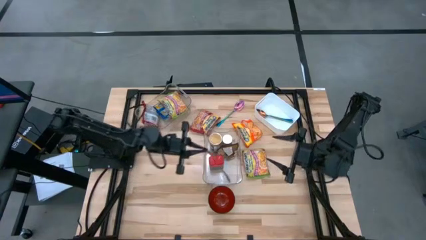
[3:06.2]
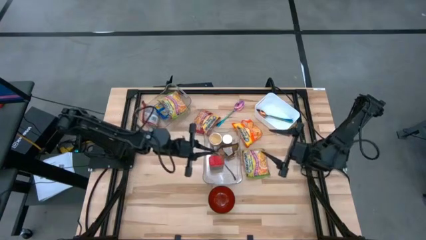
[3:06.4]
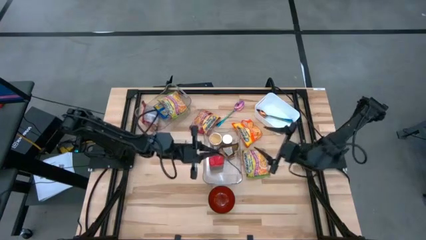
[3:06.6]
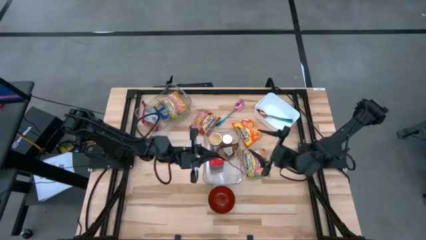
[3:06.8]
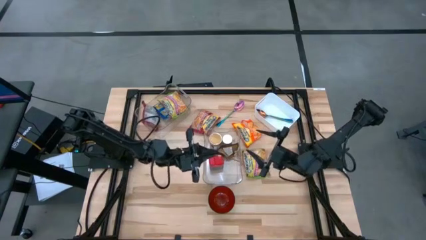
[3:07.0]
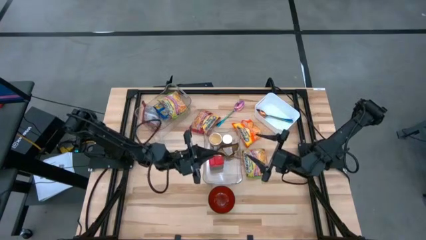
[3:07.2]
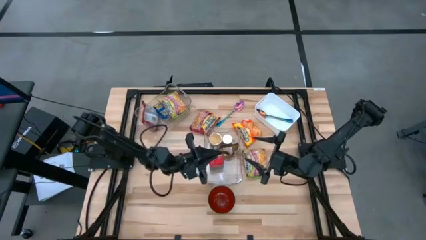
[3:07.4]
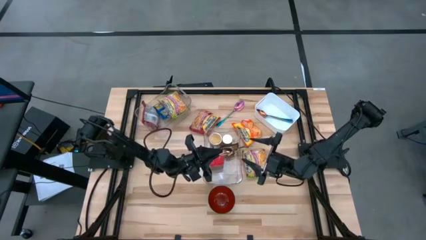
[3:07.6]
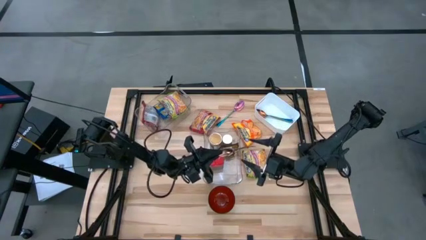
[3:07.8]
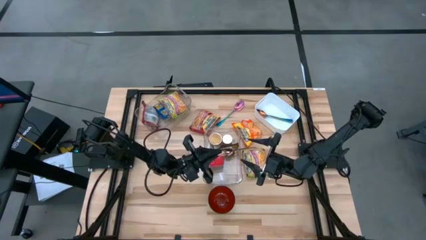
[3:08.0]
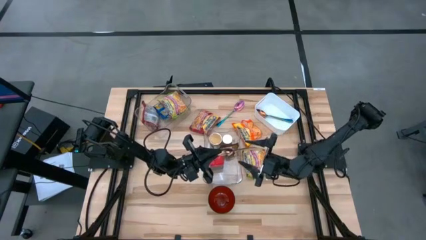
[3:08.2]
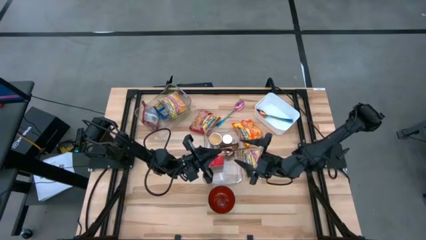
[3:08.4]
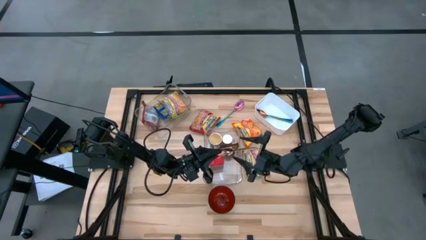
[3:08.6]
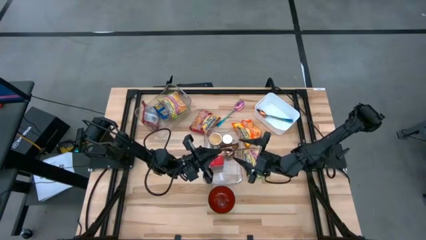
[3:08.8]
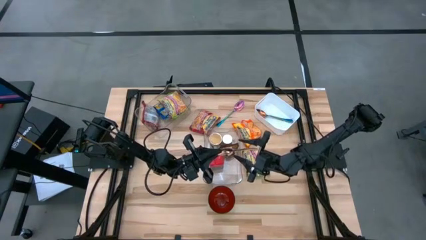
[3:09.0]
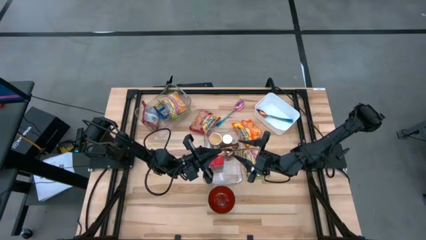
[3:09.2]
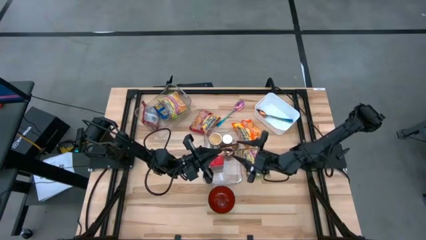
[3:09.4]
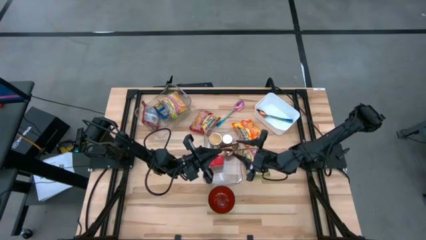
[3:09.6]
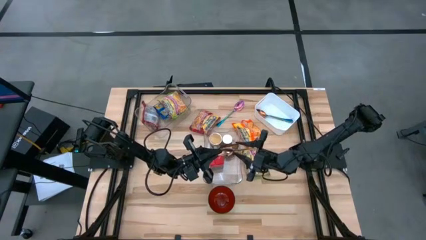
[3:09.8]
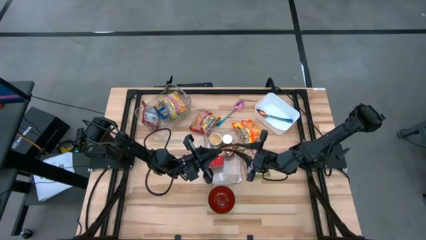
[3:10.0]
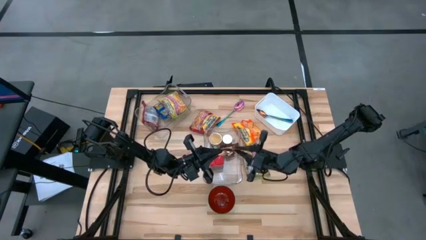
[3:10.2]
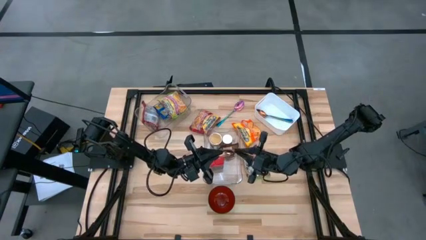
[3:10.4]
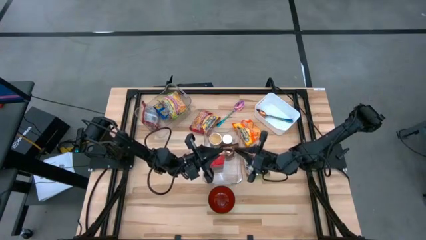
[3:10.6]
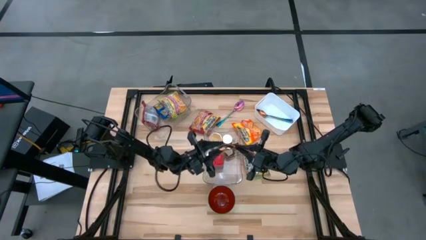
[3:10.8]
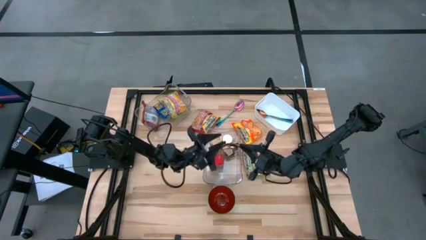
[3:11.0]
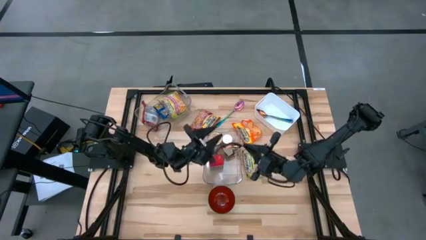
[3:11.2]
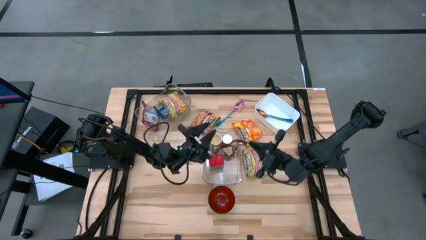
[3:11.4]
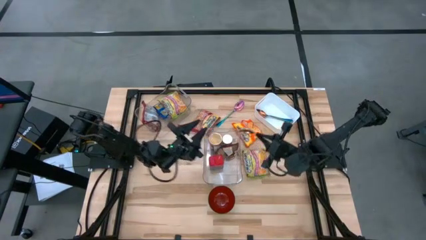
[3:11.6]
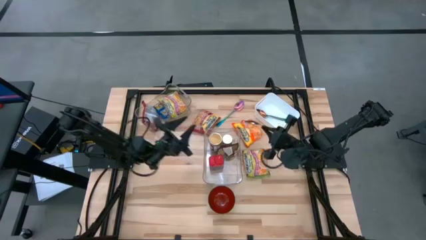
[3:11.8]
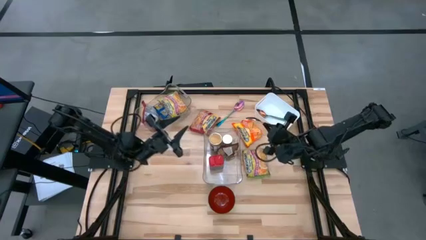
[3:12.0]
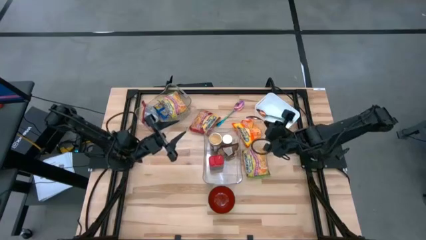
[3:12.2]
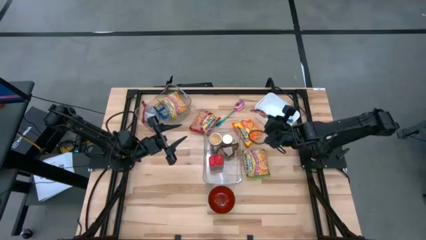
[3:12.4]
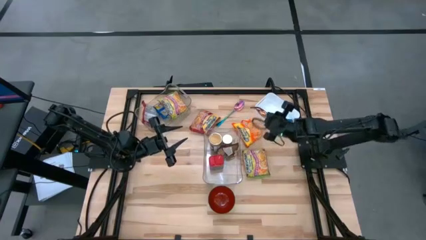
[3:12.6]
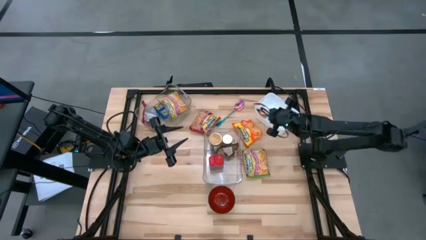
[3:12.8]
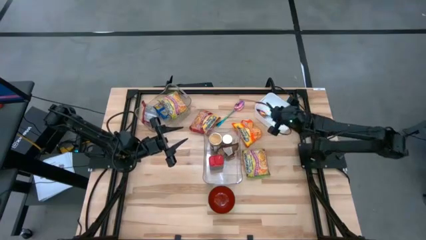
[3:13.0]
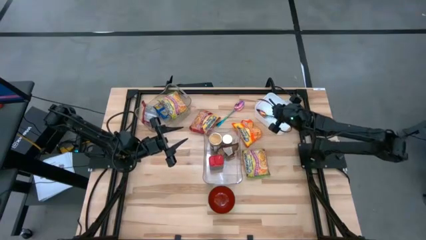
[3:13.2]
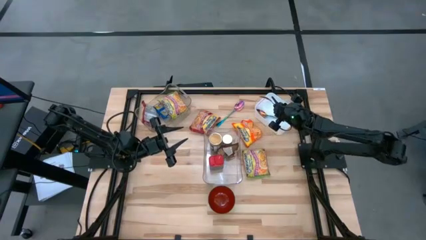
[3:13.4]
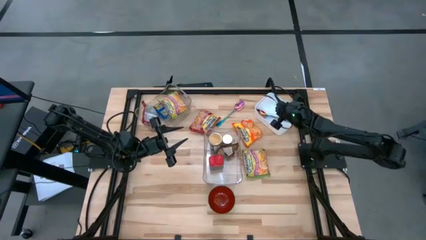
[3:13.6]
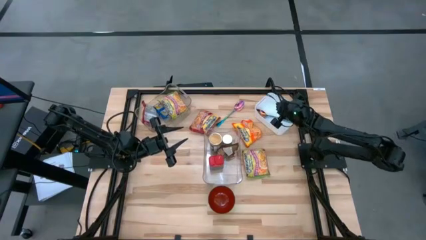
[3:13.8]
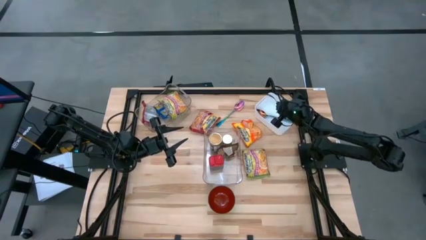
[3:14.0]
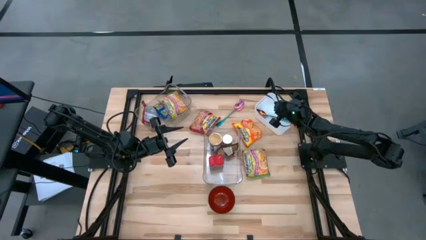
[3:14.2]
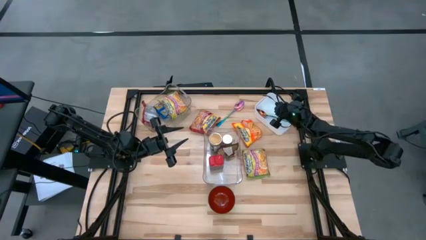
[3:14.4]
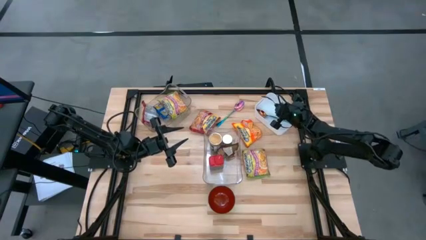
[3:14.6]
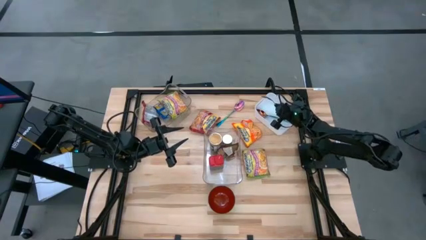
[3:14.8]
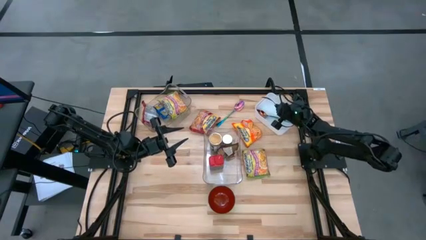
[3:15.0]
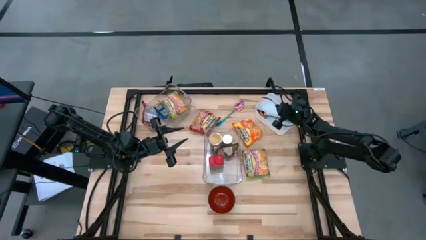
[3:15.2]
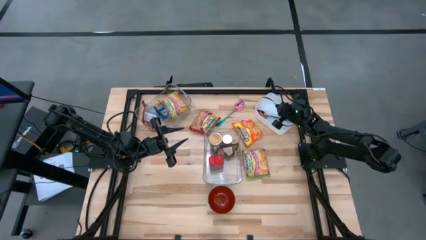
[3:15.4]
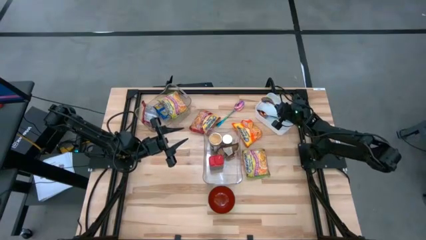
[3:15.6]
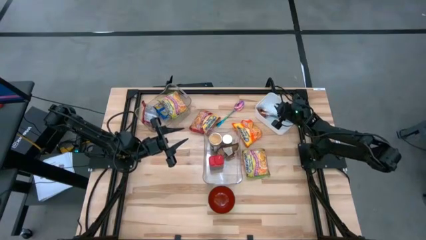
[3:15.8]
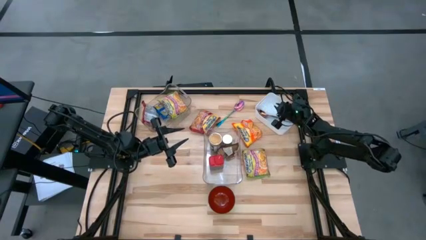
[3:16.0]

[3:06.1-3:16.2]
Task: Pick & Place Food Item
Put the gold spoon into the white bin

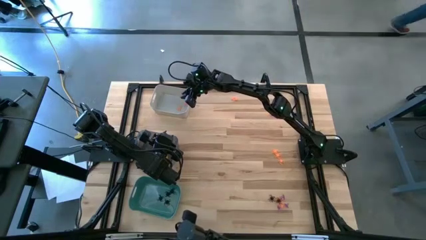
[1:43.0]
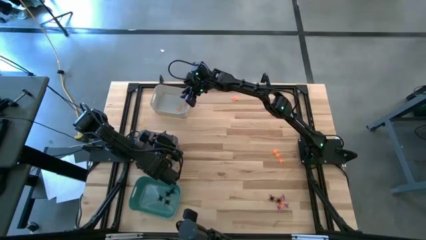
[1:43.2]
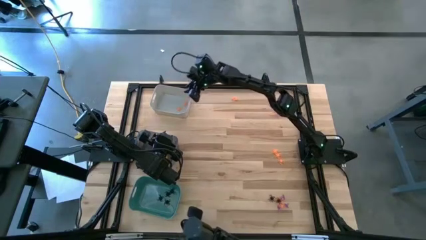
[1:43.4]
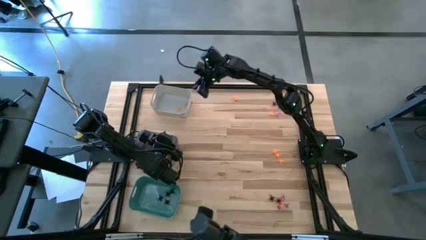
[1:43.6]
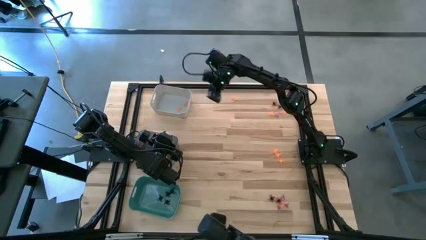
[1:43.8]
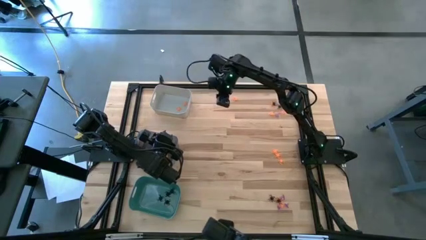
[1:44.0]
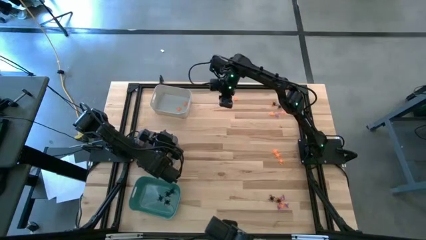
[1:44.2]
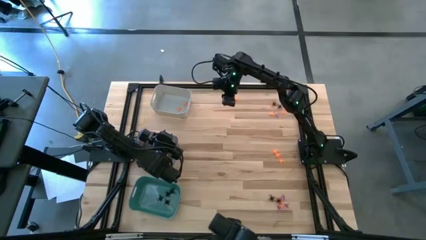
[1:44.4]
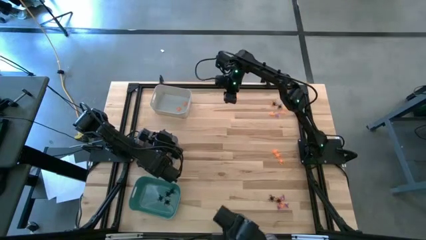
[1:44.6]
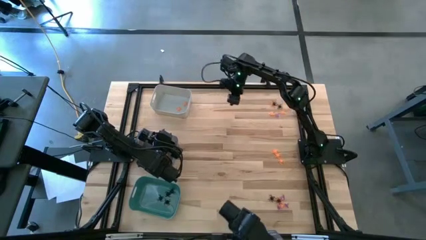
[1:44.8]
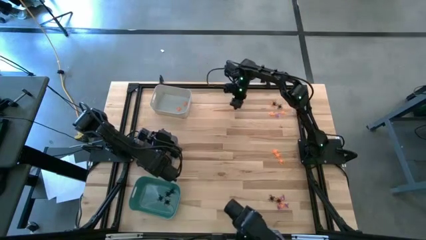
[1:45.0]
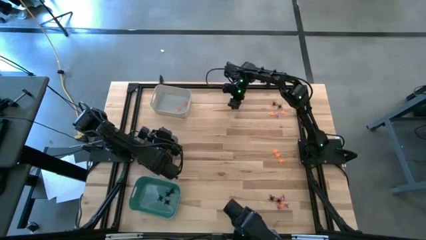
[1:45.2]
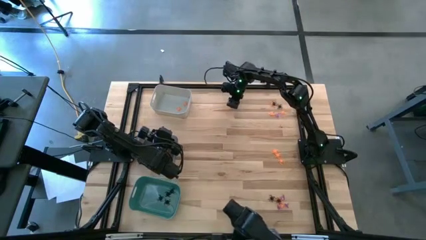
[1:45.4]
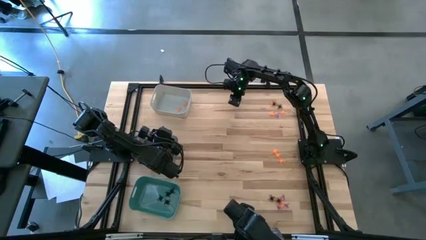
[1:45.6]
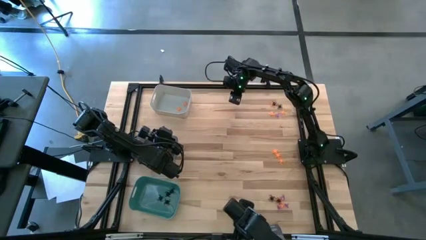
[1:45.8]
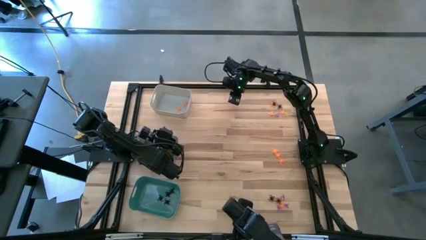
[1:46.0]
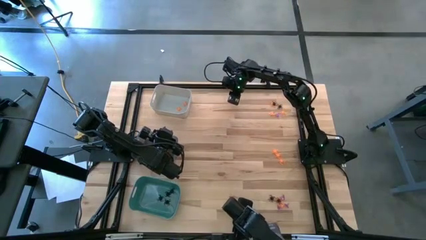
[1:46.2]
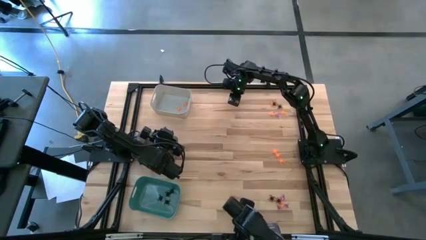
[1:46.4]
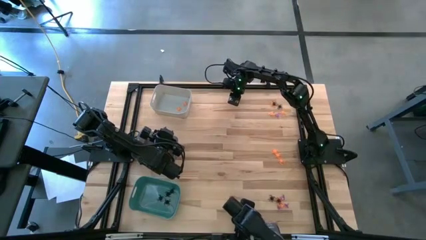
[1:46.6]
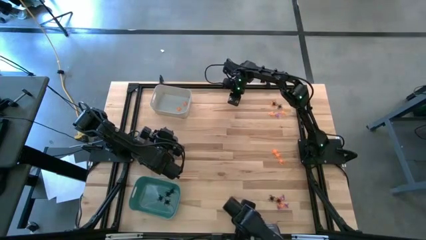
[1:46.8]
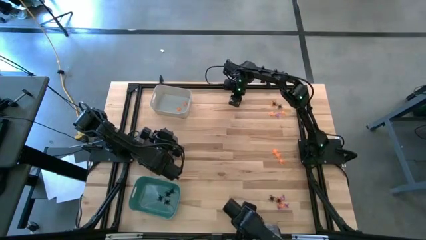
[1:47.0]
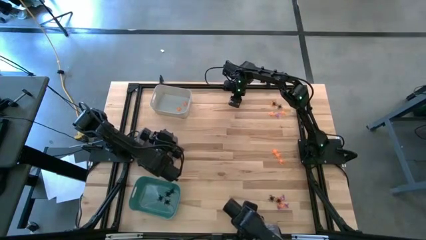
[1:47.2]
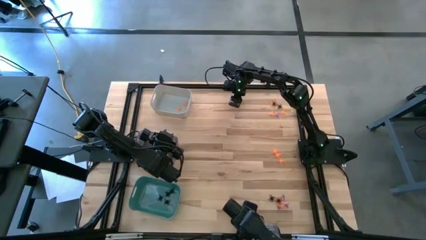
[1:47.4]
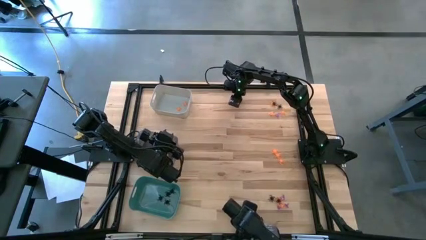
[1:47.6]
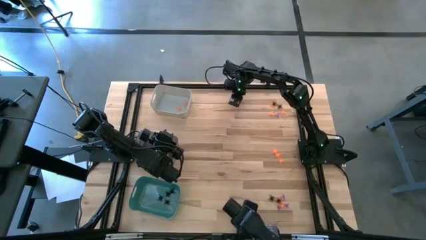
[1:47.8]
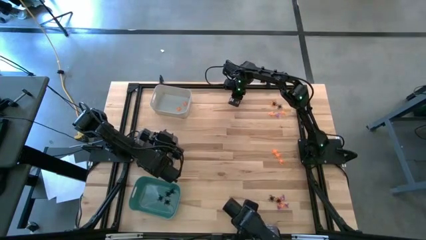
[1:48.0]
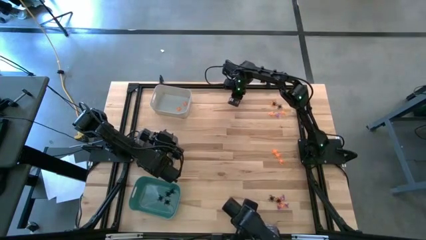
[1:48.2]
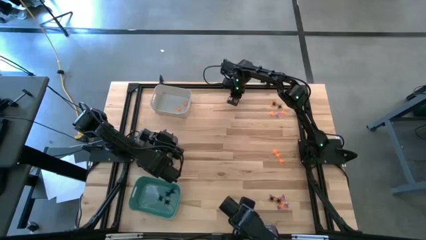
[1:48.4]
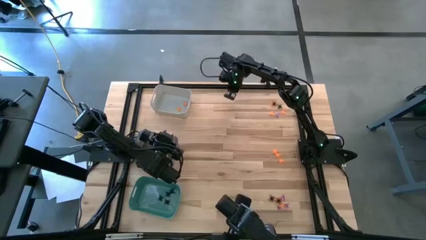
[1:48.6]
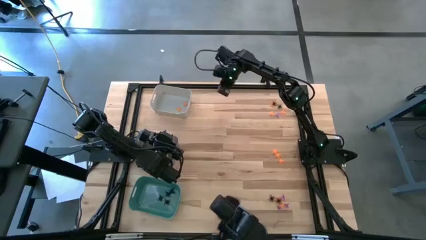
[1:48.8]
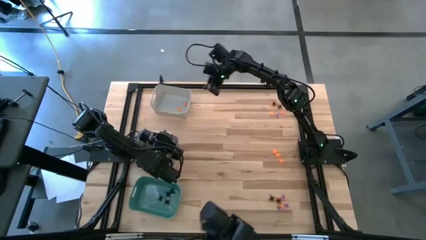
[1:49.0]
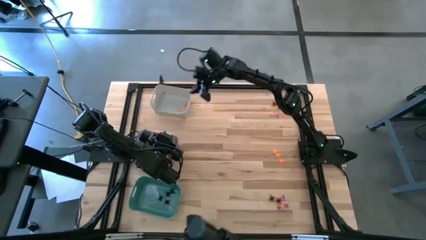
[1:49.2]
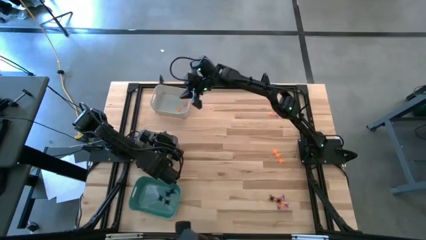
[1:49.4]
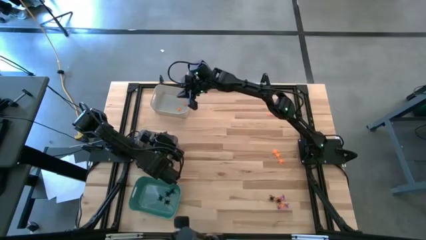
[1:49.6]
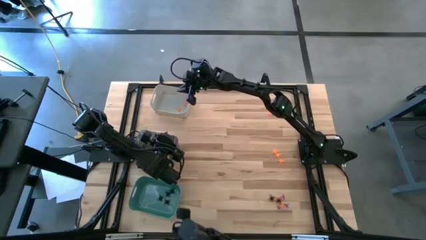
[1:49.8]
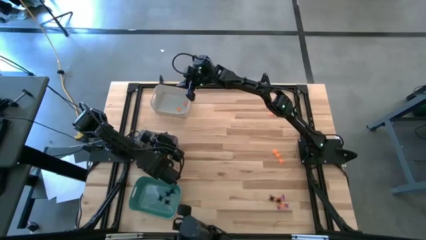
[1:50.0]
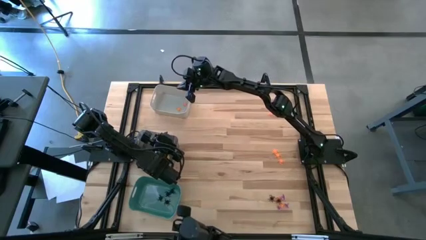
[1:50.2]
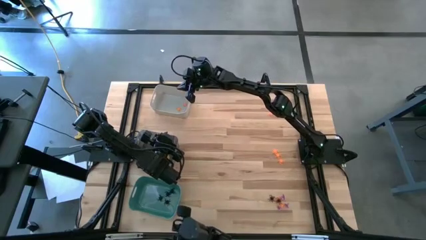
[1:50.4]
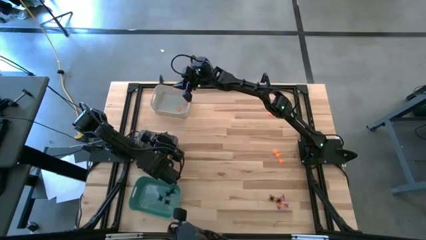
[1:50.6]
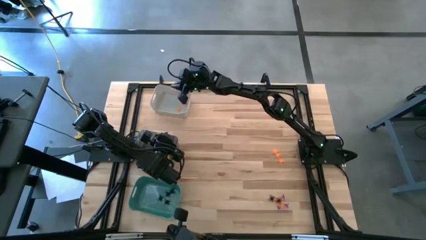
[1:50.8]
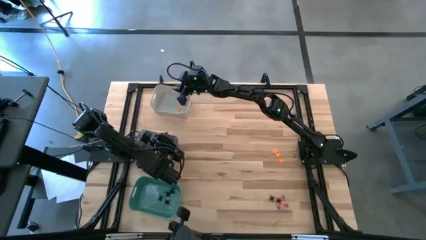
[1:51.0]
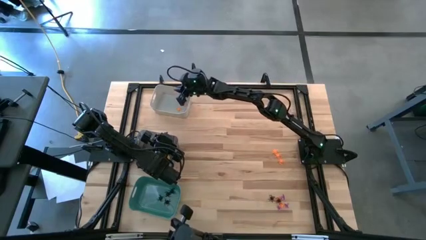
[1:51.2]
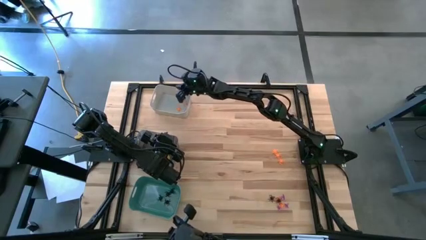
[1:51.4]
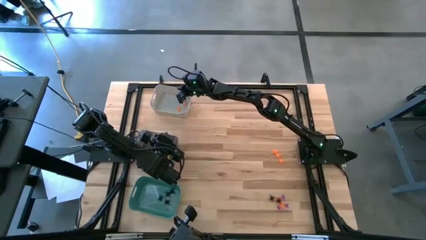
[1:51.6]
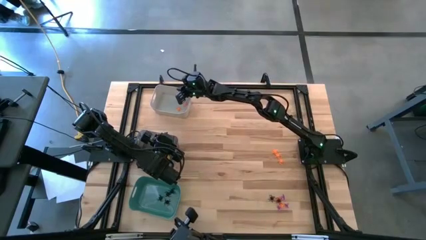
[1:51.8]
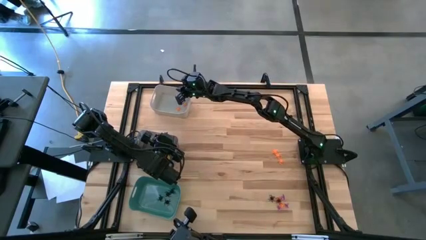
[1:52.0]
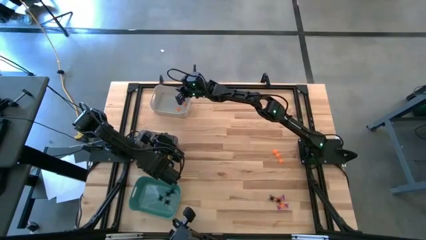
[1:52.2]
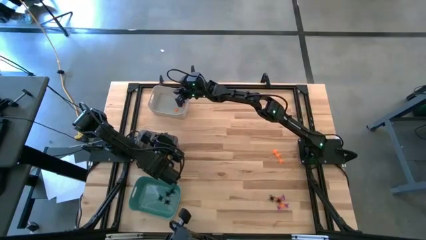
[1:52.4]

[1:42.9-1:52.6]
Task: Sort Halloween decoration
Put the top center orange spider into the gray bin
